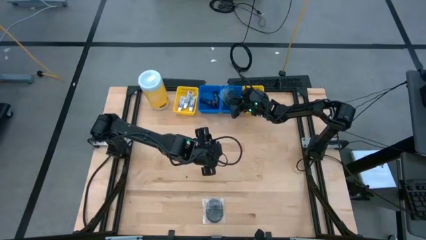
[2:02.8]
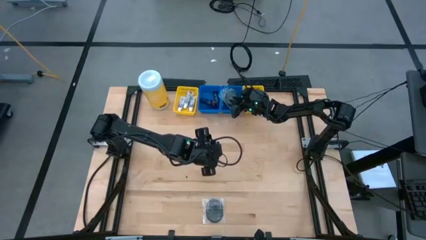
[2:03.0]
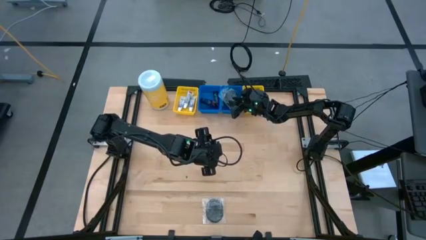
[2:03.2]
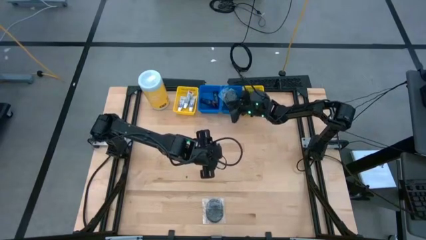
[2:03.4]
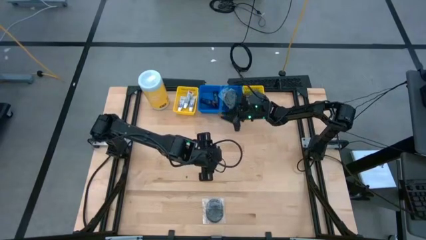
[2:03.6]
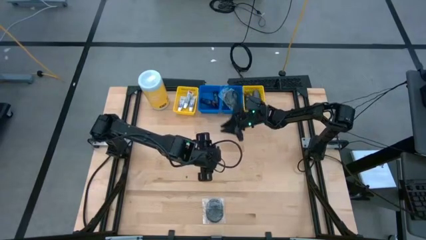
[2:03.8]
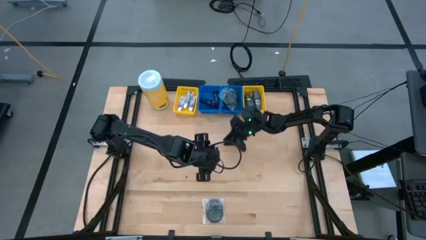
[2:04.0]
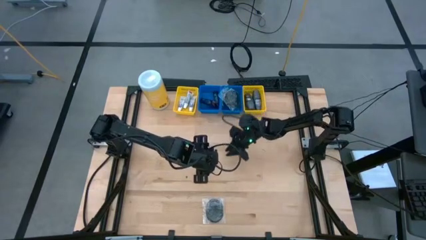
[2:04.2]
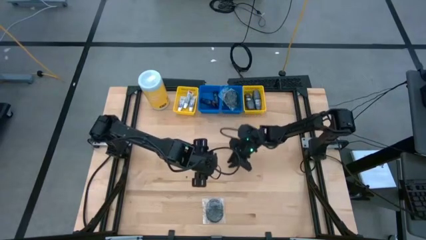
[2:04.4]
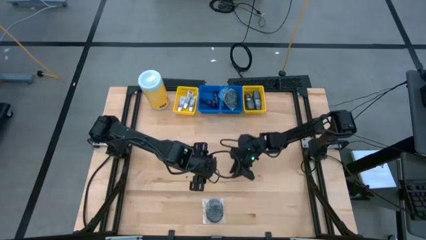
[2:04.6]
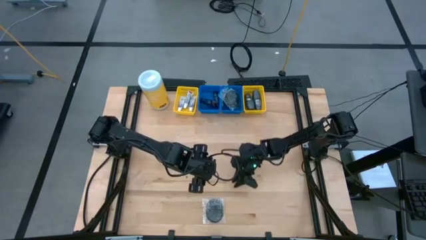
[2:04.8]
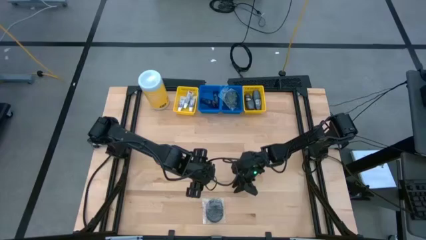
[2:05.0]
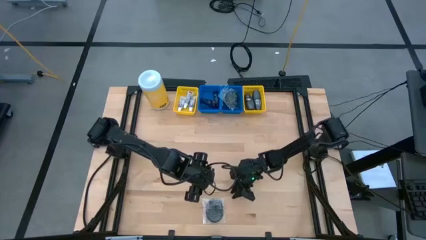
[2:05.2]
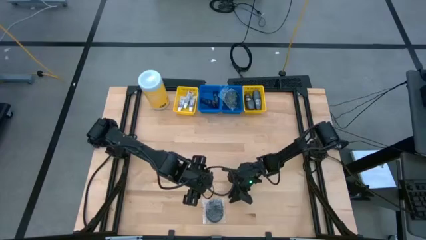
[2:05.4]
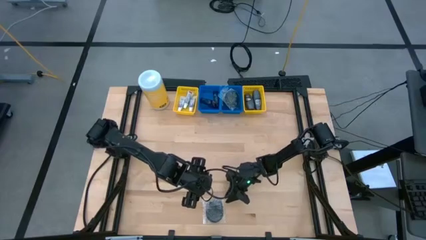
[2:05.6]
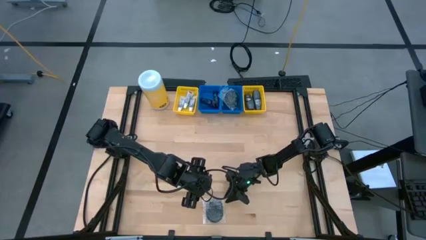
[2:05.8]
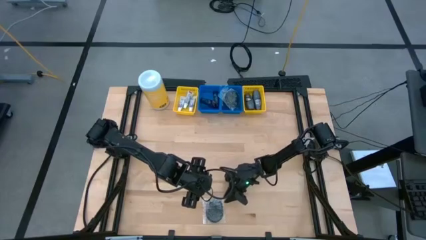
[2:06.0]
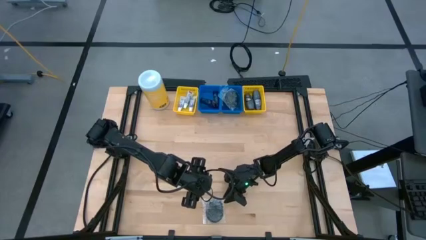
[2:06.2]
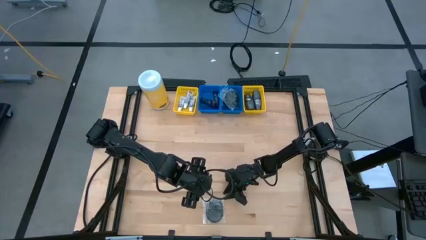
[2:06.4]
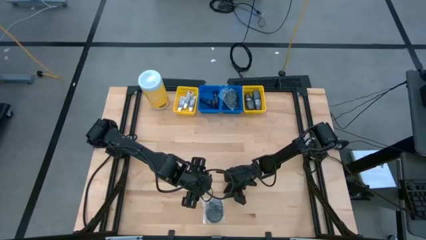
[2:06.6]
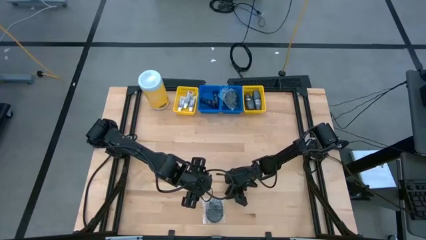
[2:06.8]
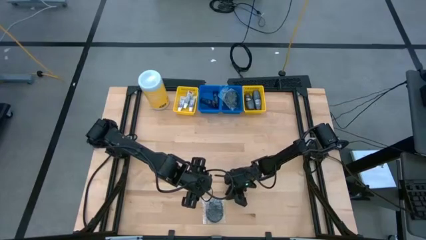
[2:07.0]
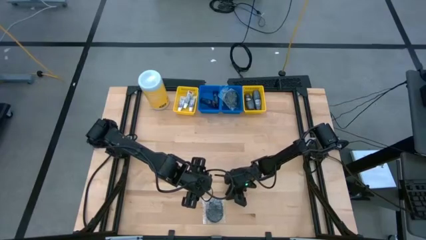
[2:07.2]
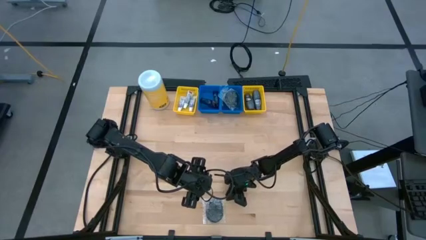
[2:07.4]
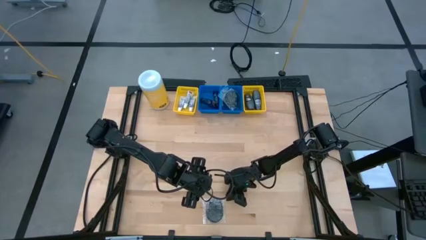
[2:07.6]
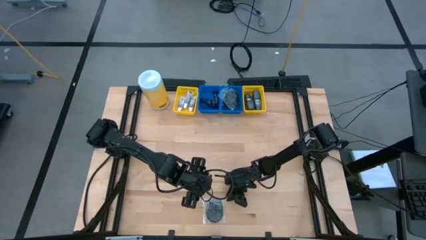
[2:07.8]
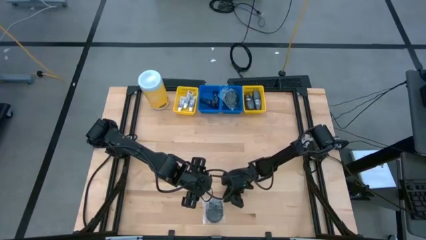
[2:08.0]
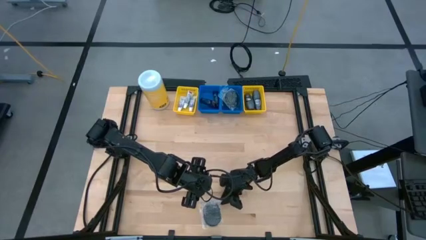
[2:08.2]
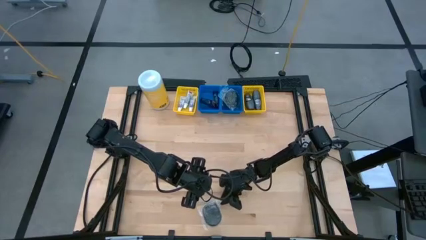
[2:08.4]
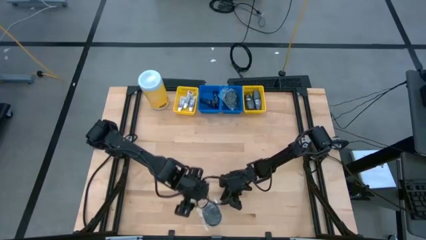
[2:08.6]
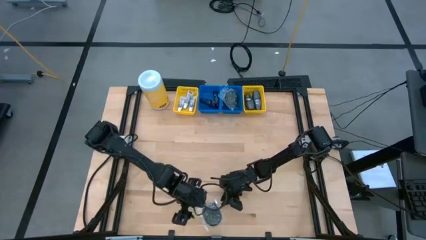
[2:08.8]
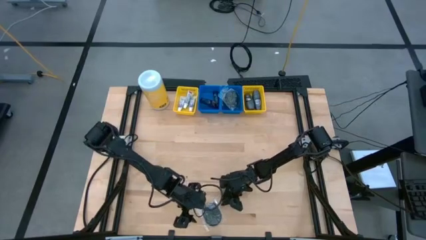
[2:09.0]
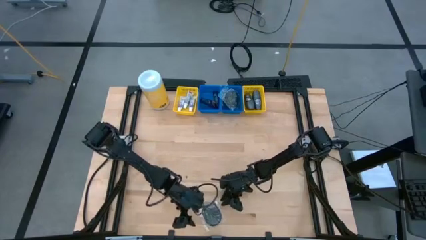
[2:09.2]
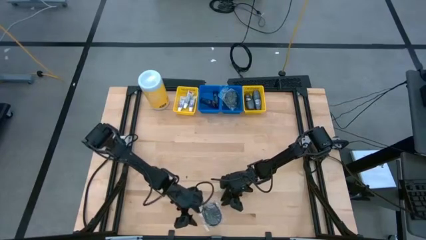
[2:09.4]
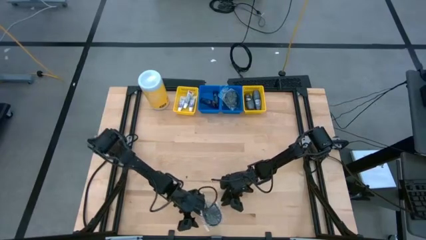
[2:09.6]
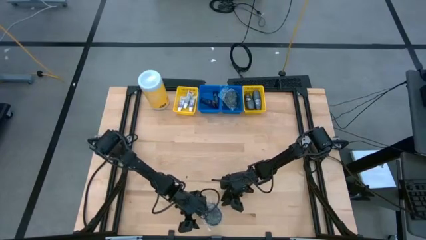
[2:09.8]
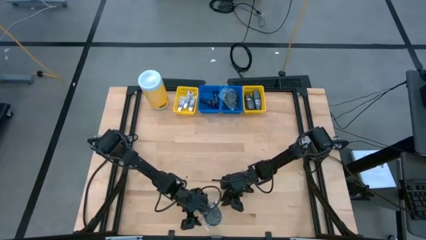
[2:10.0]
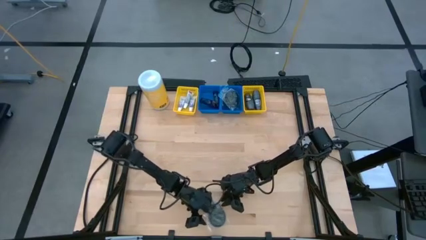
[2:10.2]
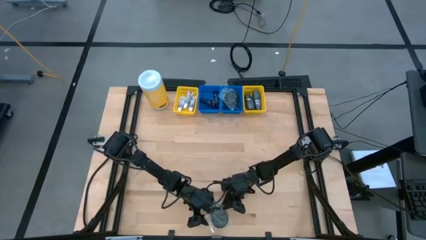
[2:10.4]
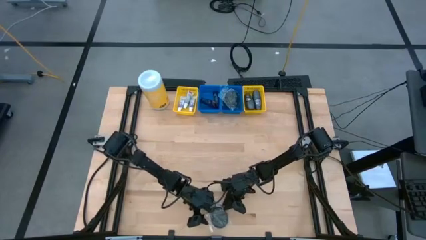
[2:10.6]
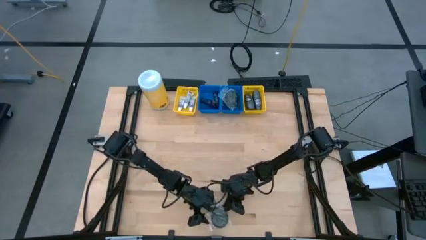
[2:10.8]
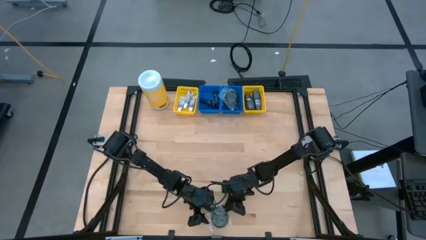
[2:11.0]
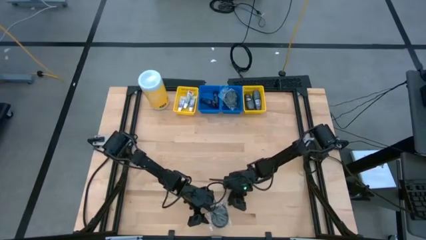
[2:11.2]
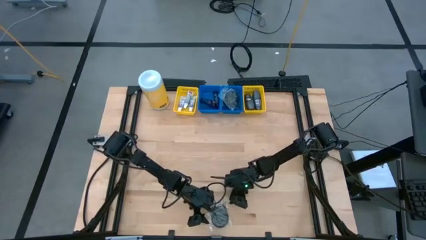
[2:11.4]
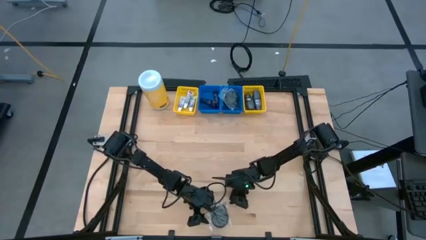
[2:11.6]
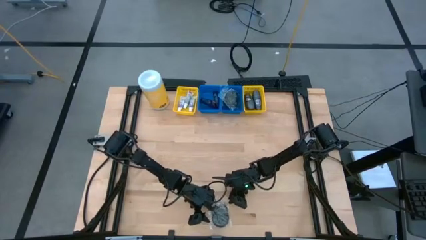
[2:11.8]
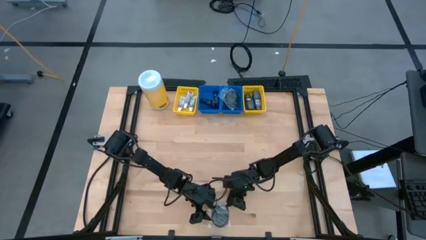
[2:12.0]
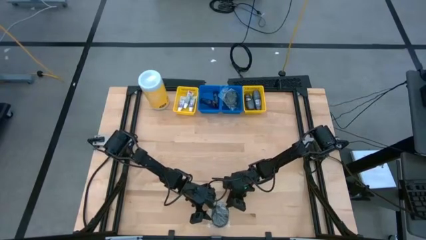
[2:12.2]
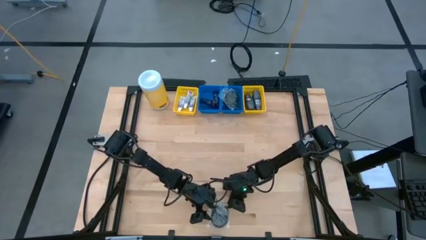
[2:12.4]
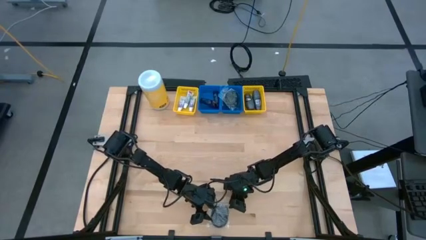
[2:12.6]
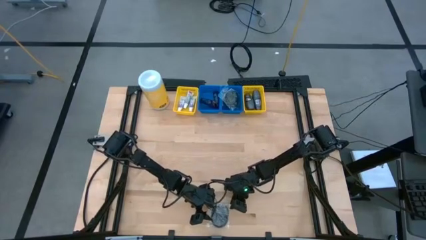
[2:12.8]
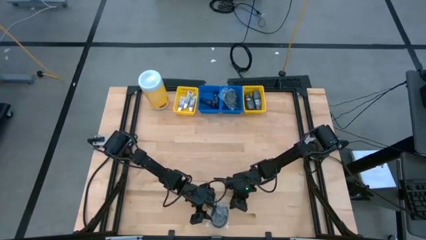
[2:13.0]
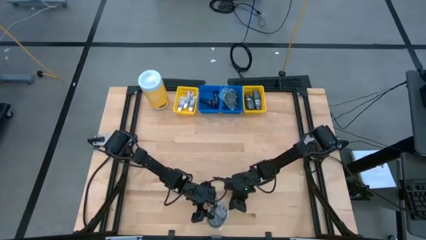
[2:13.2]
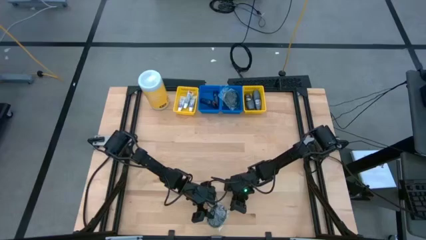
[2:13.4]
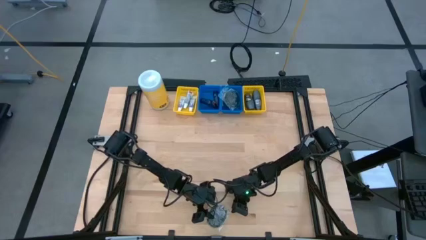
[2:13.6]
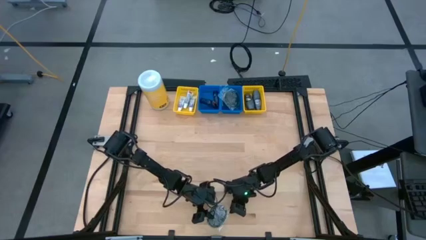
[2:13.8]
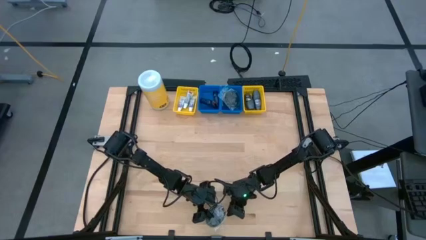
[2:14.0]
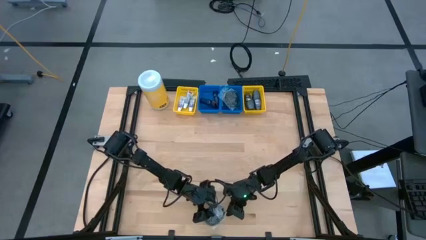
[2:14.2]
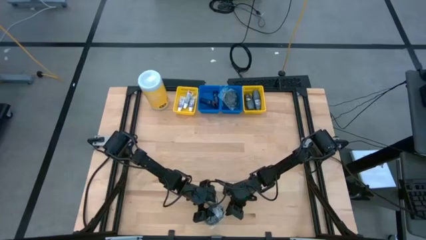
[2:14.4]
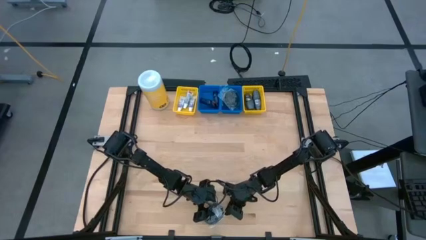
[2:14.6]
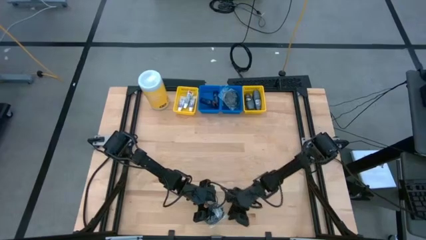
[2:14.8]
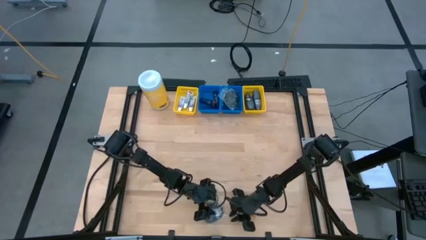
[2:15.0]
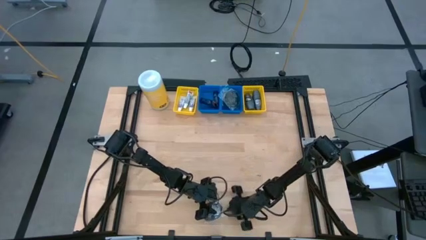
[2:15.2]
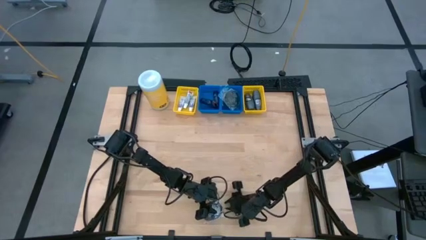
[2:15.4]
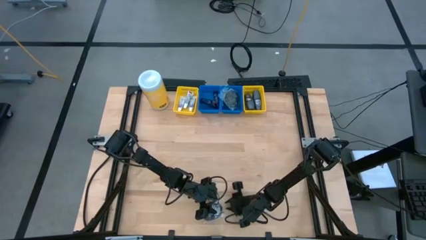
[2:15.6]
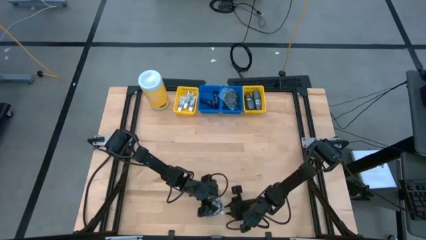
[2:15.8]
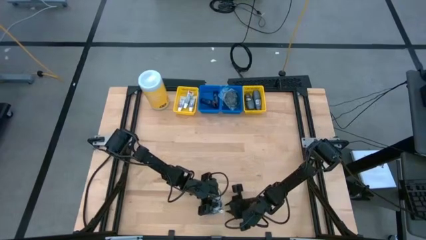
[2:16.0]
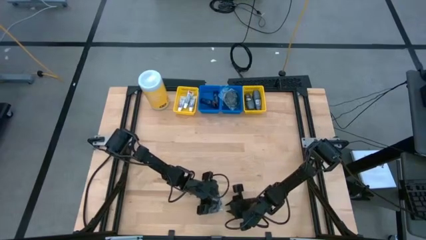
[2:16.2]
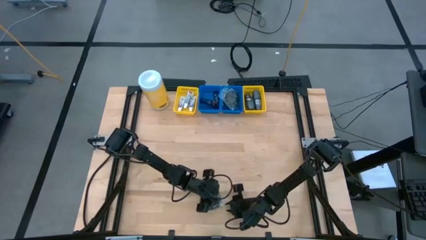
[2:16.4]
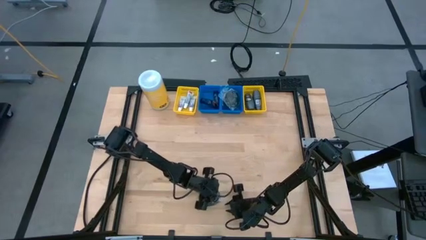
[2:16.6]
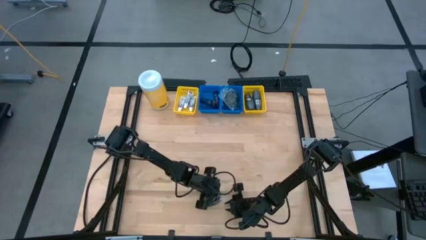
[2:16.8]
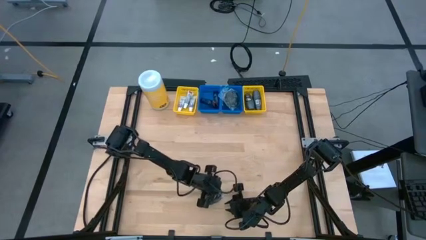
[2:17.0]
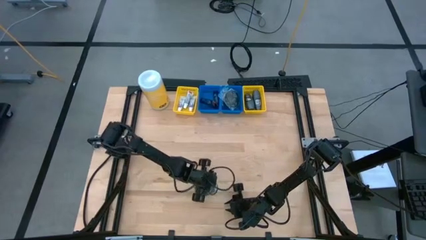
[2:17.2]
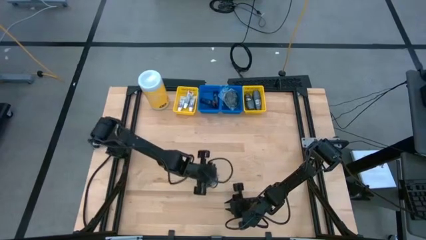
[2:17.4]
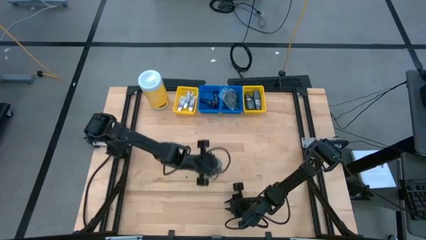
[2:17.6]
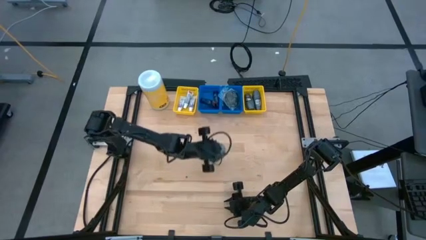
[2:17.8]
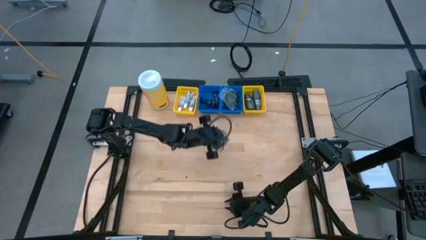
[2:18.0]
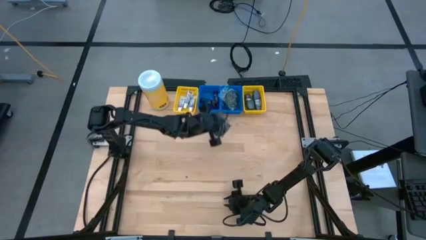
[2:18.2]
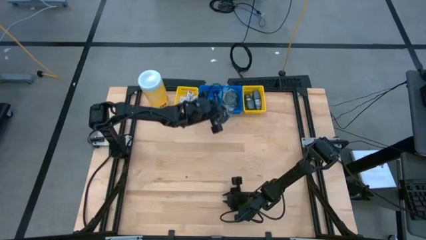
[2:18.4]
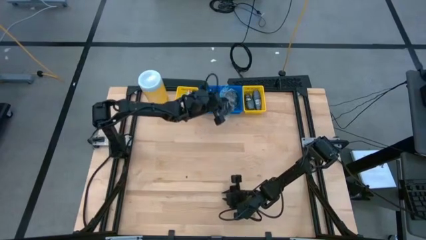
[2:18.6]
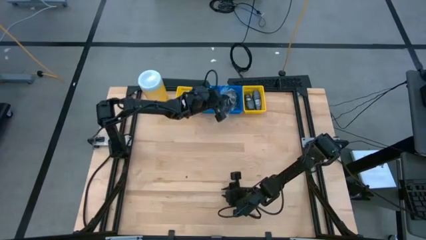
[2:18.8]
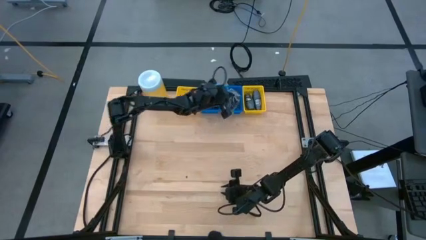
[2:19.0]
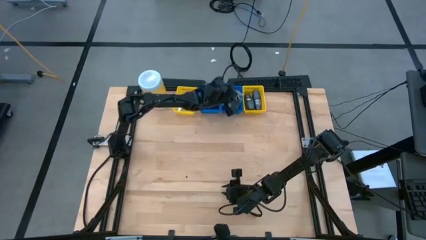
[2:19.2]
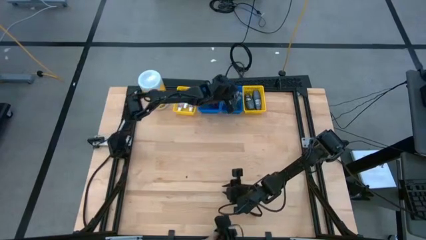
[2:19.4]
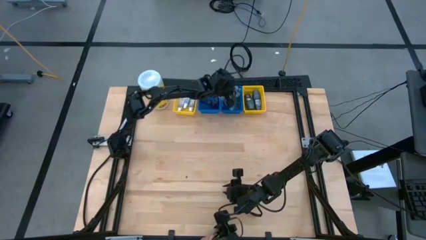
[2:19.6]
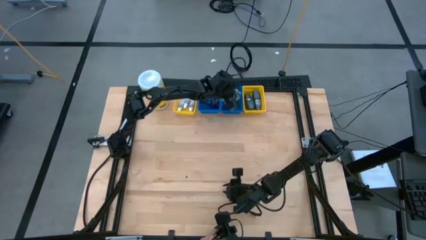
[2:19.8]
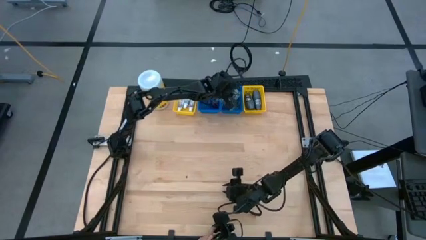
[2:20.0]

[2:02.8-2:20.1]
Task: Pick & Place Travel size toiletries
Put the hairbrush into the right blue bin
